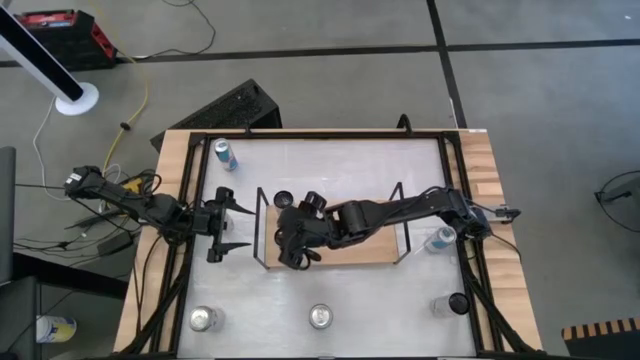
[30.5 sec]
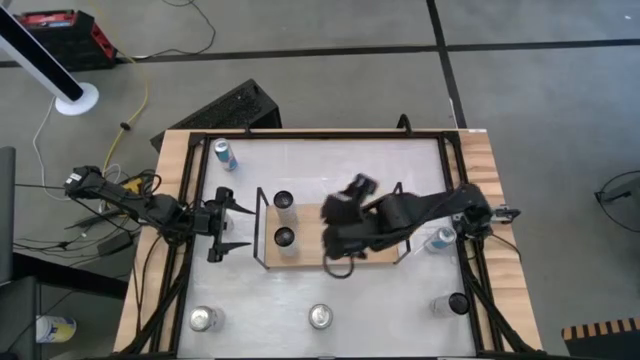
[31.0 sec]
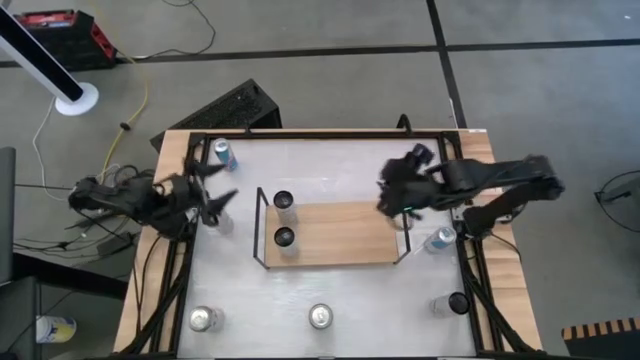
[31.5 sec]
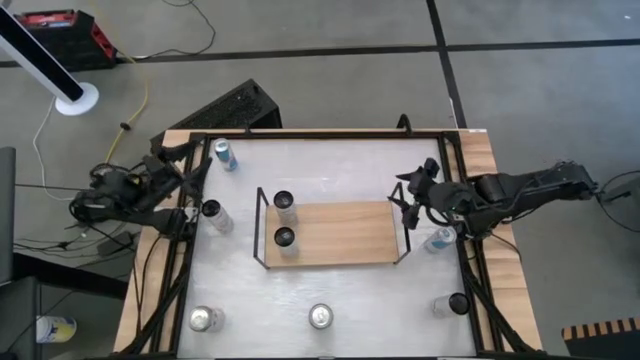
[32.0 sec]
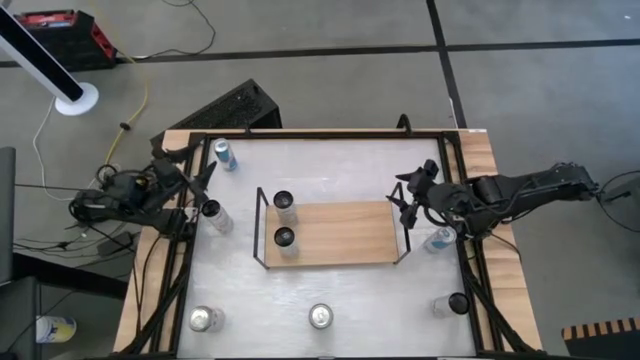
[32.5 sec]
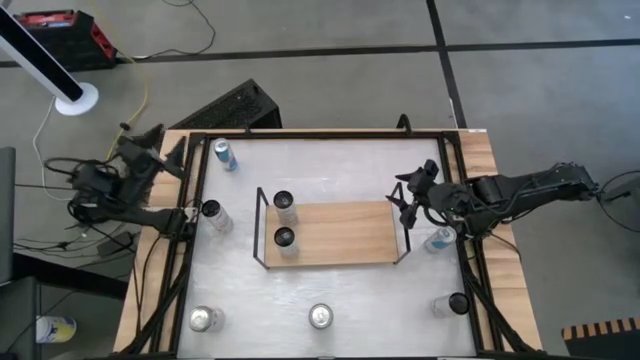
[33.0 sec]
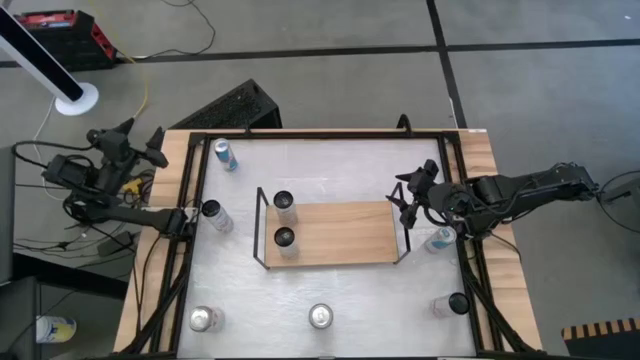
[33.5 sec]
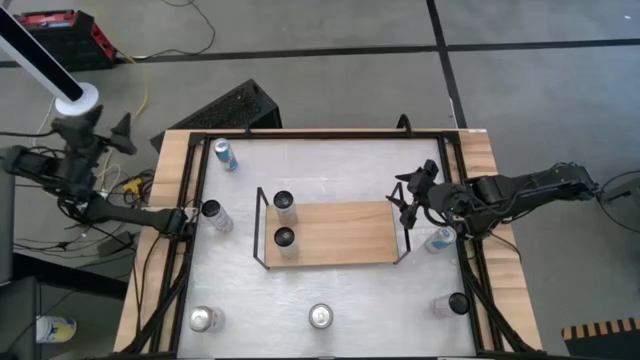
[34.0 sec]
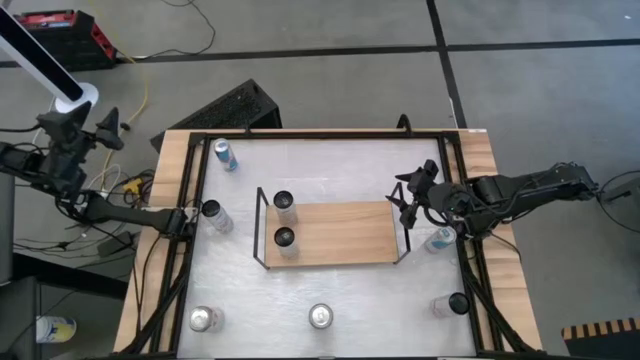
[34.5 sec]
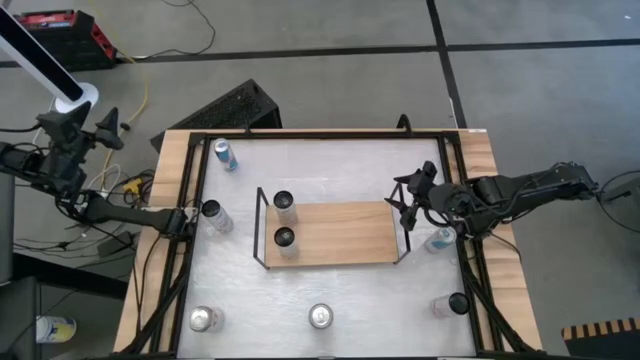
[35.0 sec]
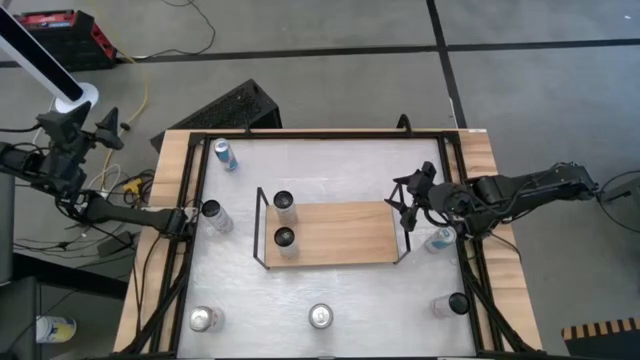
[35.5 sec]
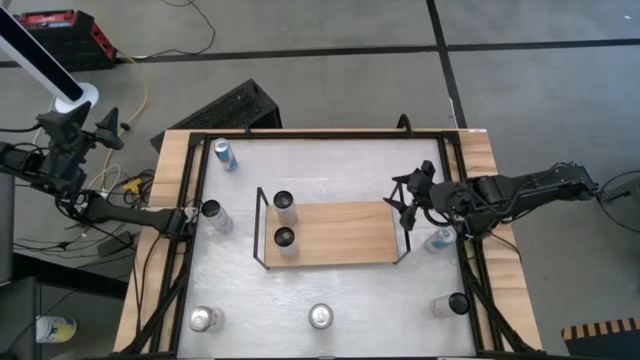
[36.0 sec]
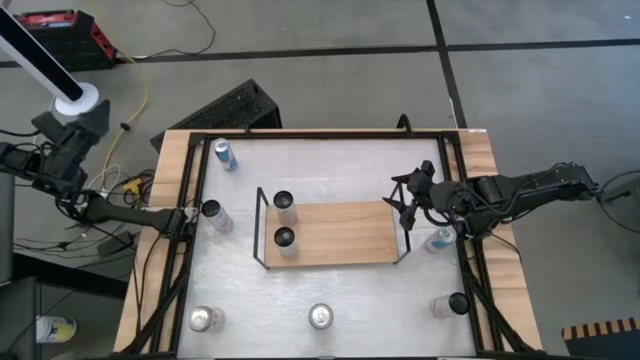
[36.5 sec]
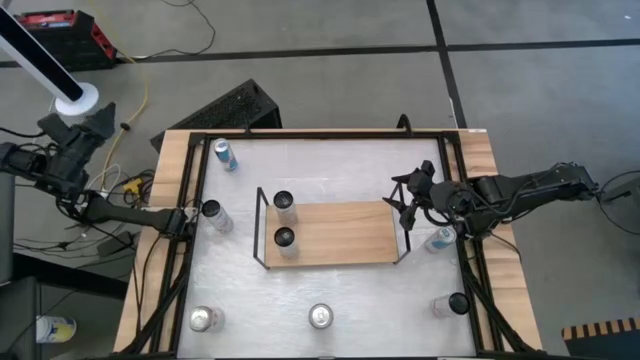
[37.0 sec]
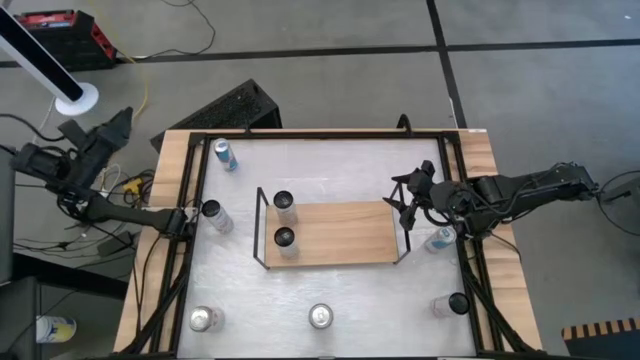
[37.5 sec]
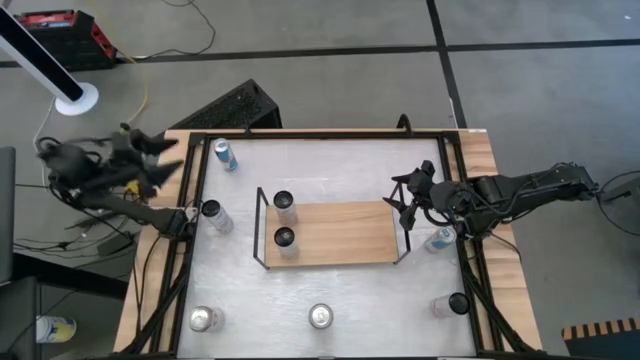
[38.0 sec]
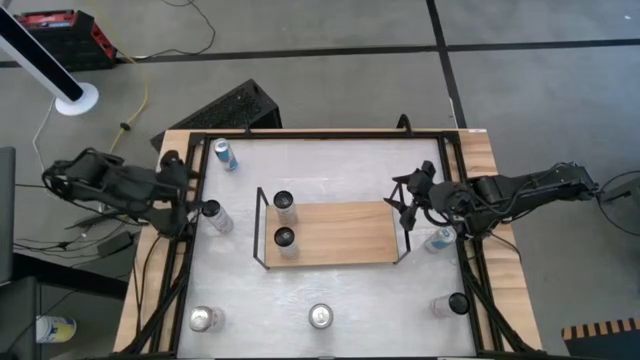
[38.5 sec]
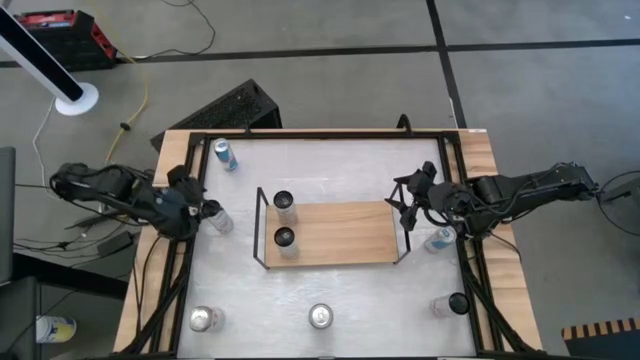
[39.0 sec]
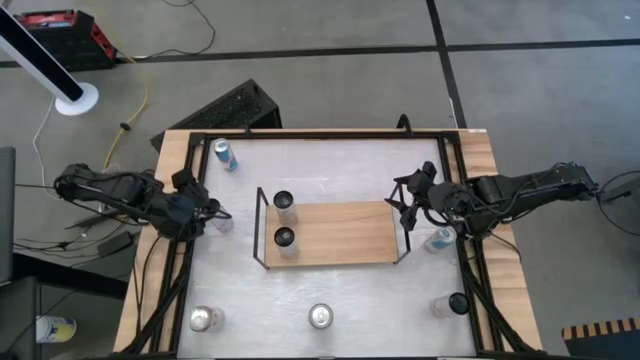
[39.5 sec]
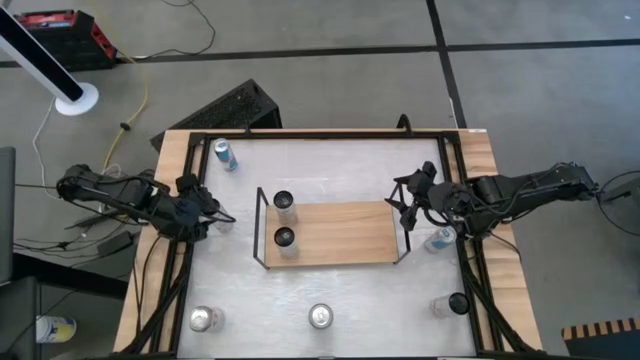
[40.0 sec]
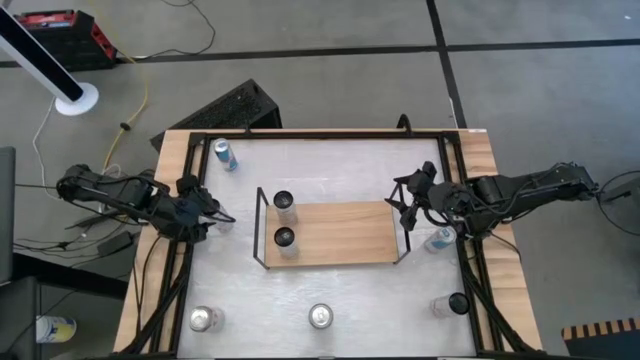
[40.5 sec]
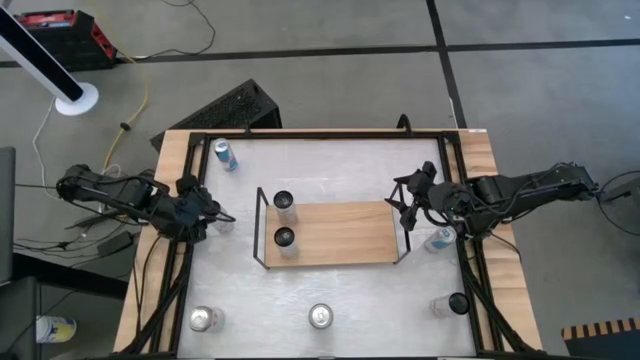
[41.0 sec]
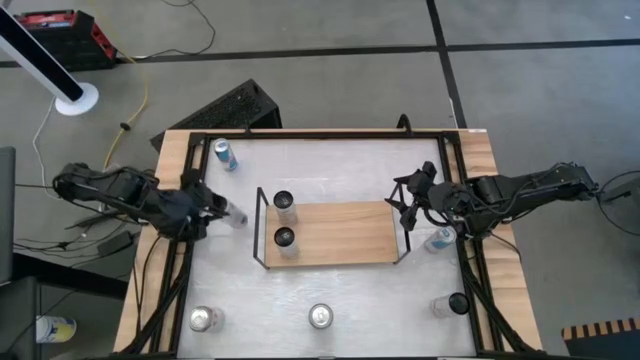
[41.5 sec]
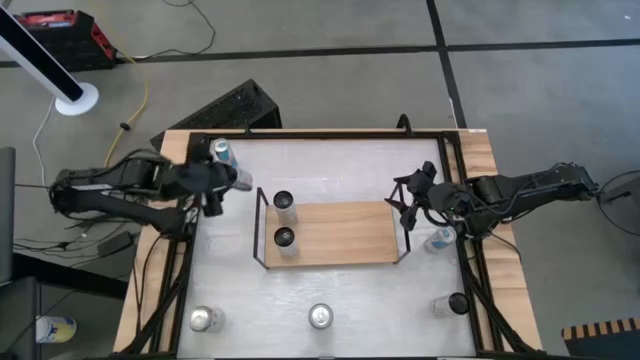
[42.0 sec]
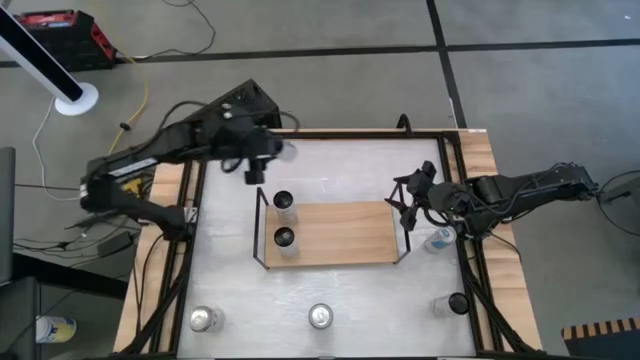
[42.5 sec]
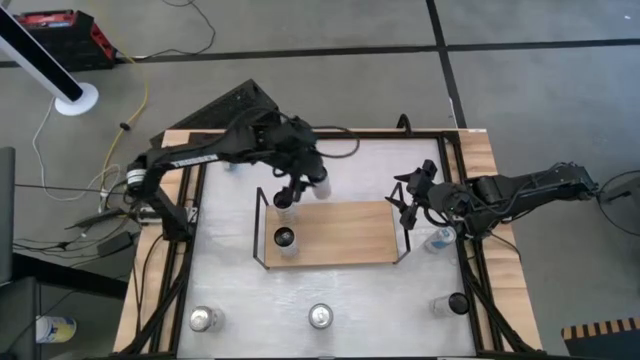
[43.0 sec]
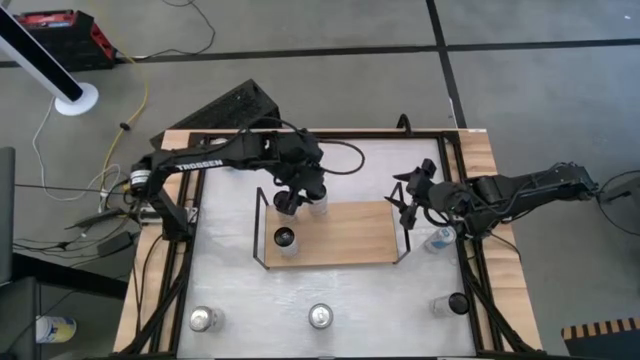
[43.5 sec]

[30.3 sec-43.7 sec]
Task: Place canned beverage on shelf
Put the left white-pink soda can on the shelf

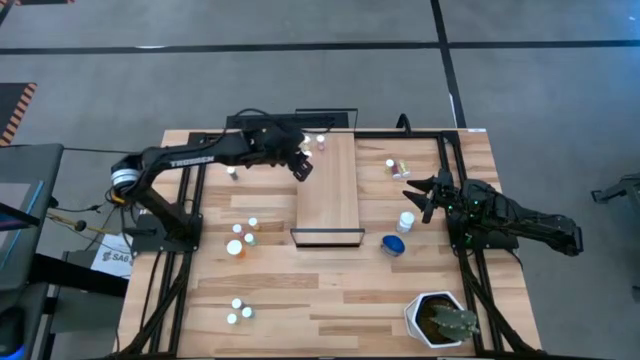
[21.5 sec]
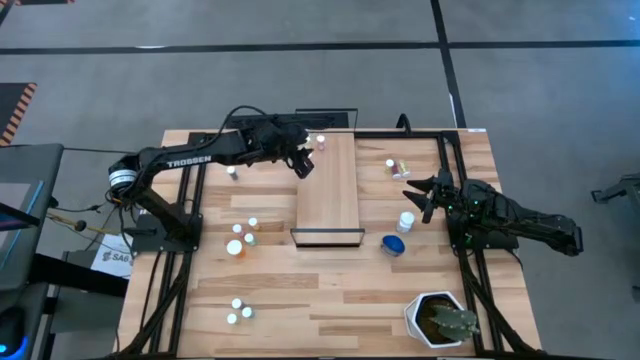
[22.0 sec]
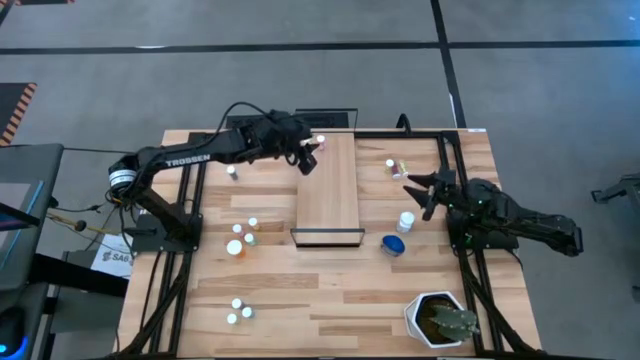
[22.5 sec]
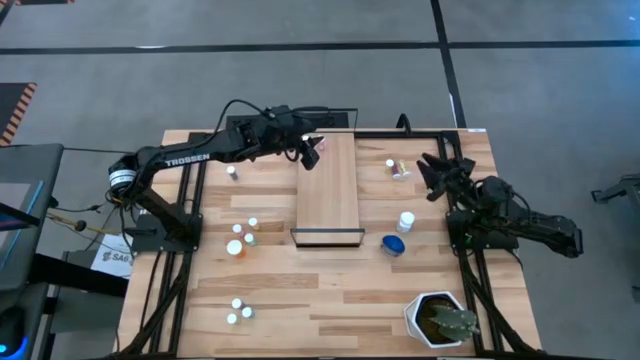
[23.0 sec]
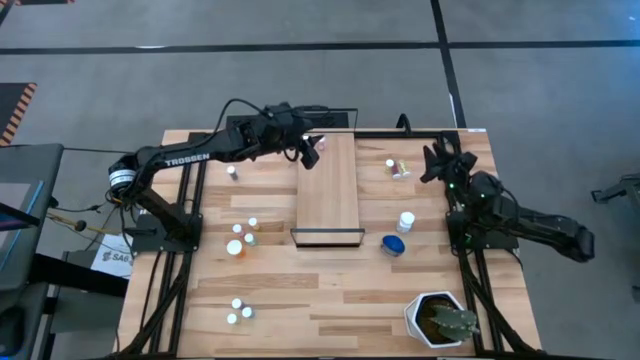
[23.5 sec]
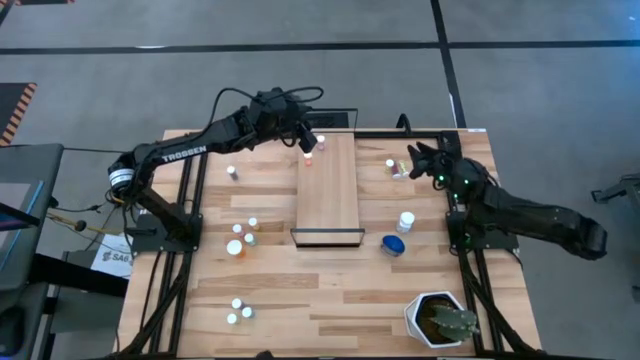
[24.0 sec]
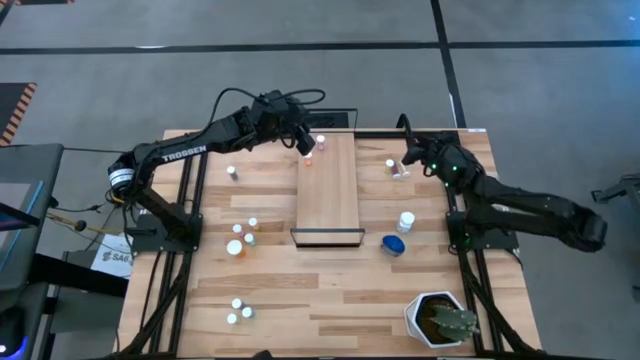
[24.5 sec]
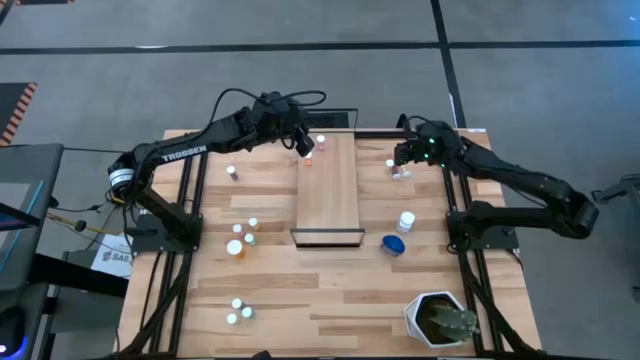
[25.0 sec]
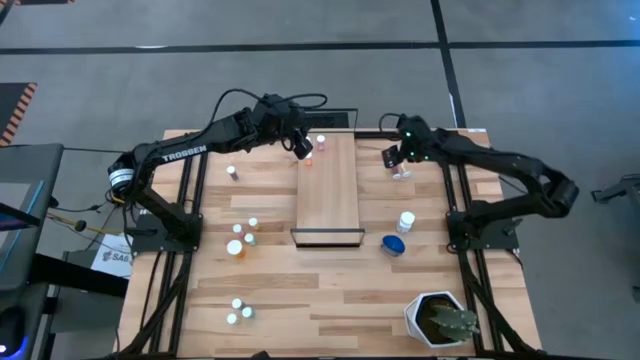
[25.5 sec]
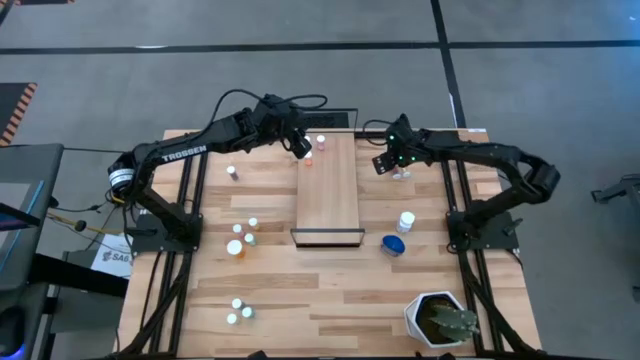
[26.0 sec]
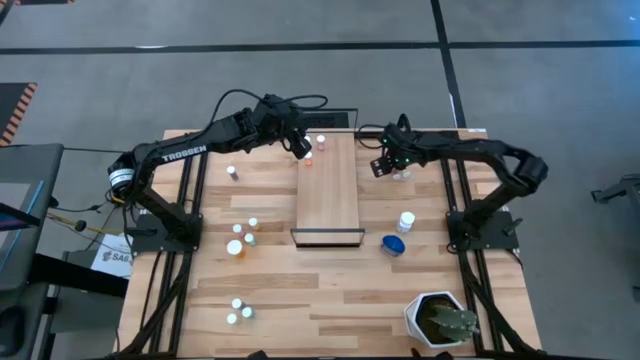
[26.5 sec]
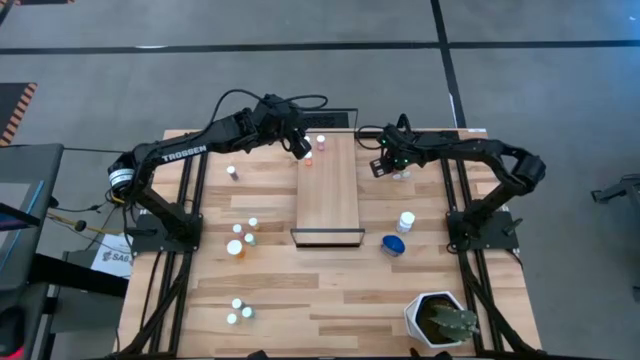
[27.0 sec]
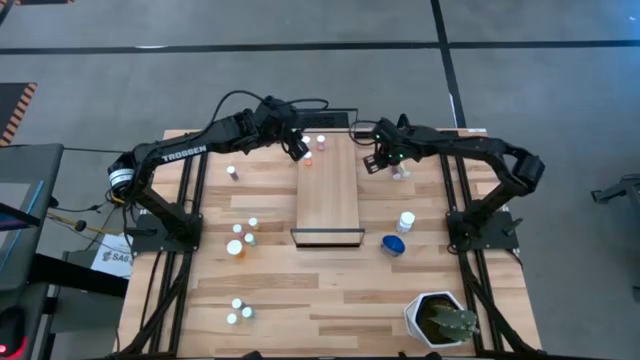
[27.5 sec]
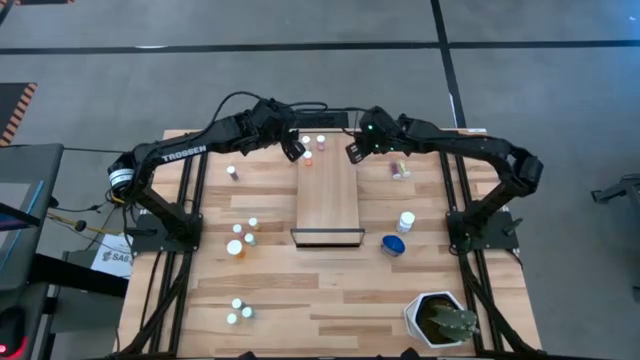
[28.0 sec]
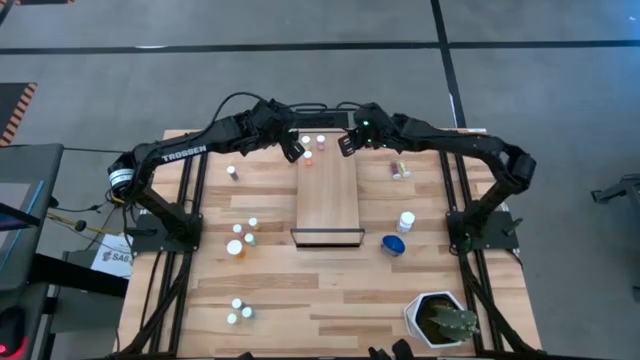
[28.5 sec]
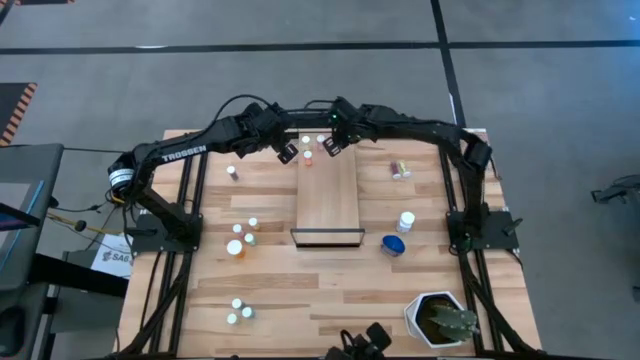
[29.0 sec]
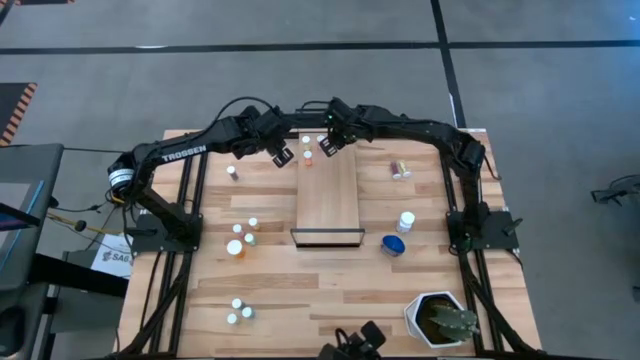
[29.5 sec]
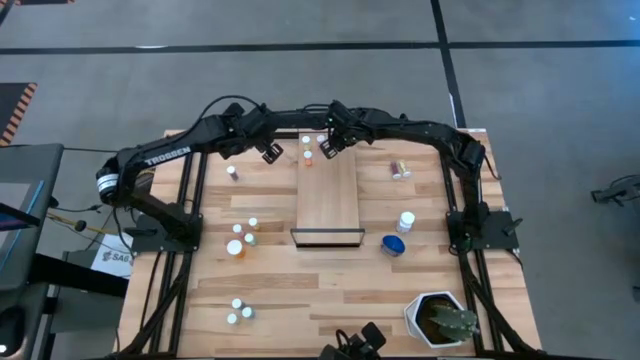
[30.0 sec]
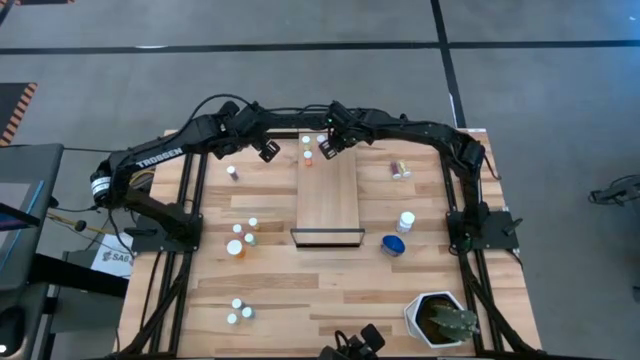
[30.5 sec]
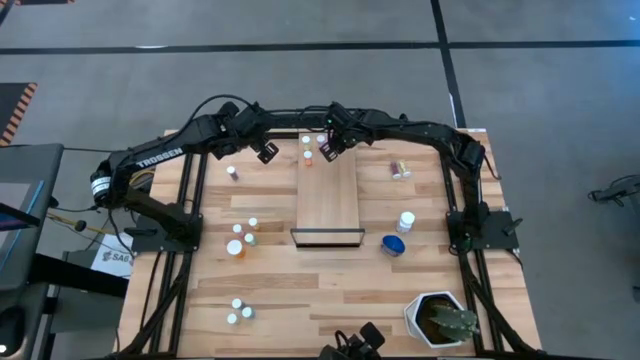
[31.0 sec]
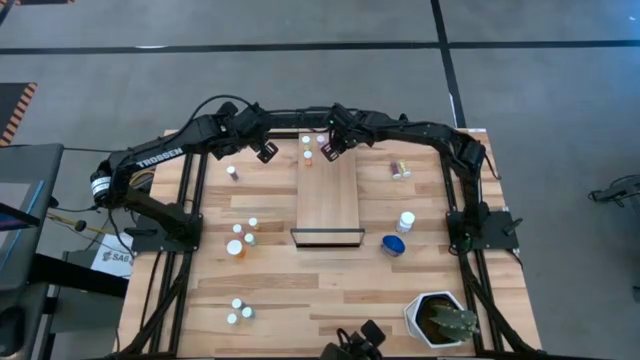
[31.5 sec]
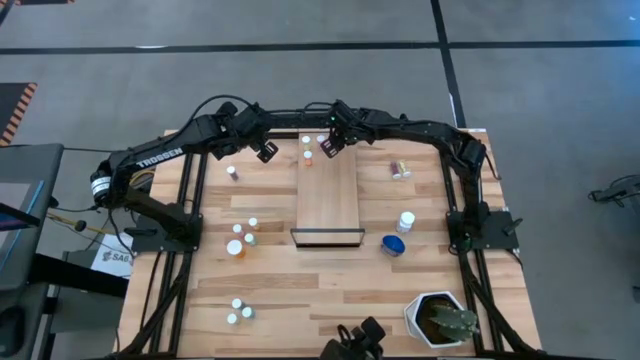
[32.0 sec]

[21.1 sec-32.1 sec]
Task: Pick and place medicine bottles onto shelf by color
Put the yellow pill bottle on the shelf
